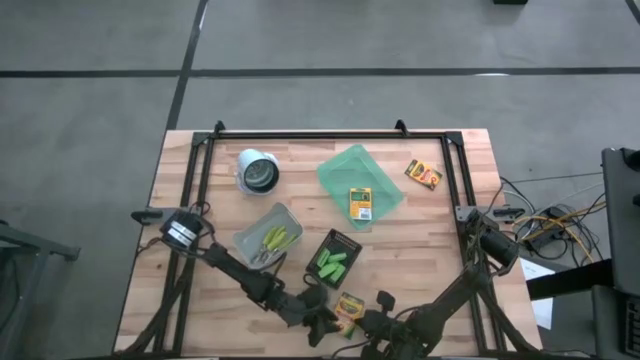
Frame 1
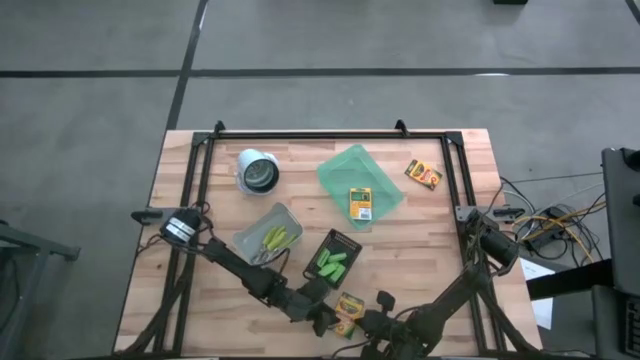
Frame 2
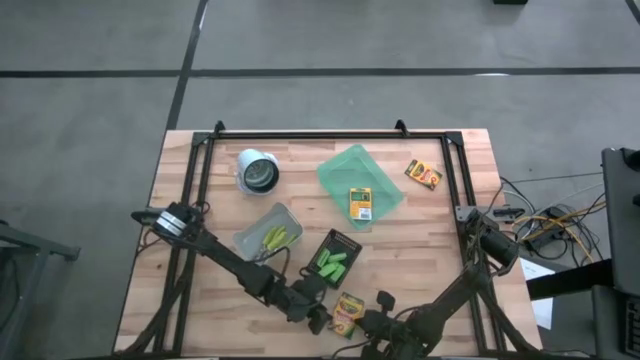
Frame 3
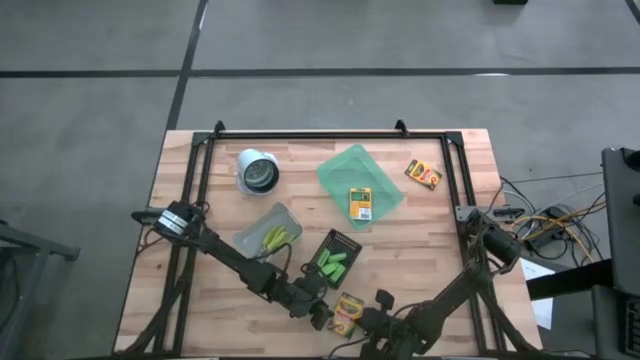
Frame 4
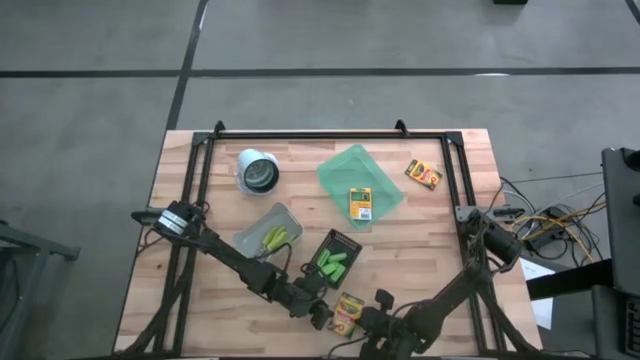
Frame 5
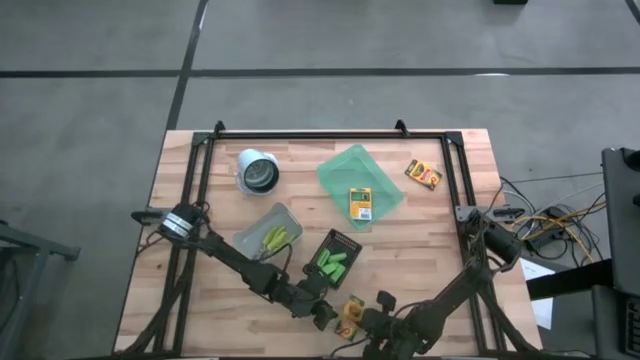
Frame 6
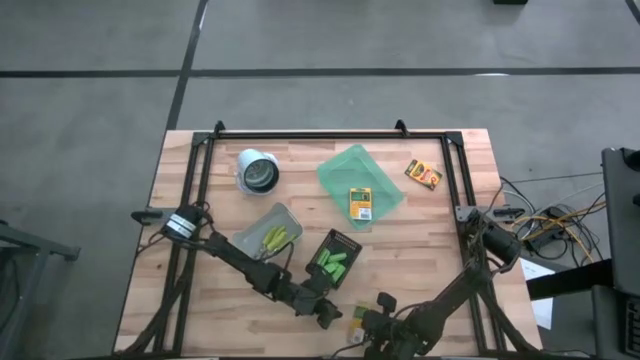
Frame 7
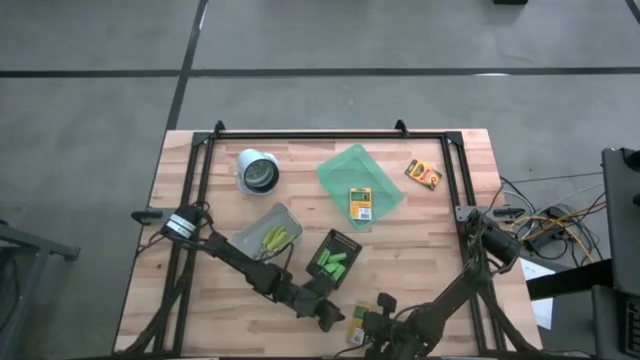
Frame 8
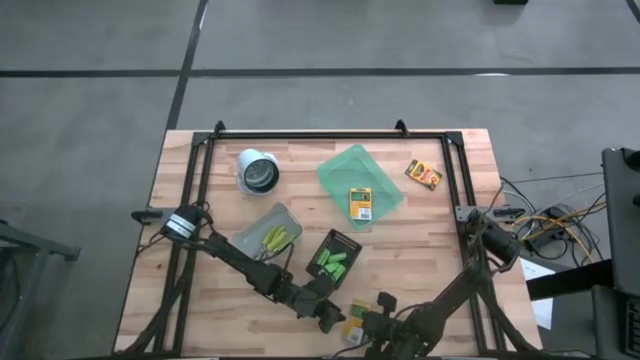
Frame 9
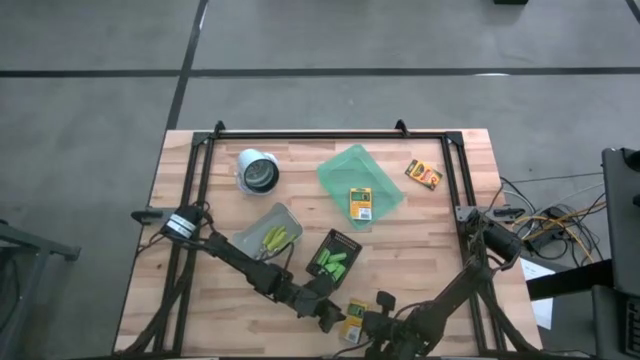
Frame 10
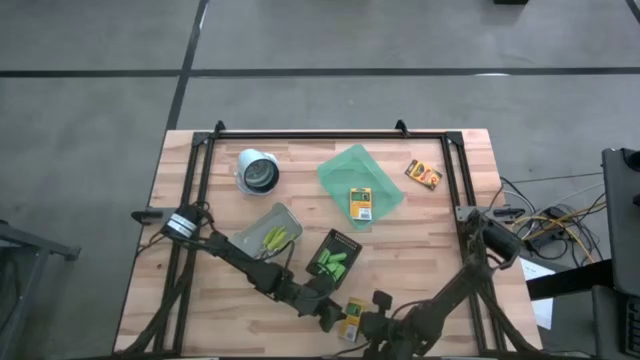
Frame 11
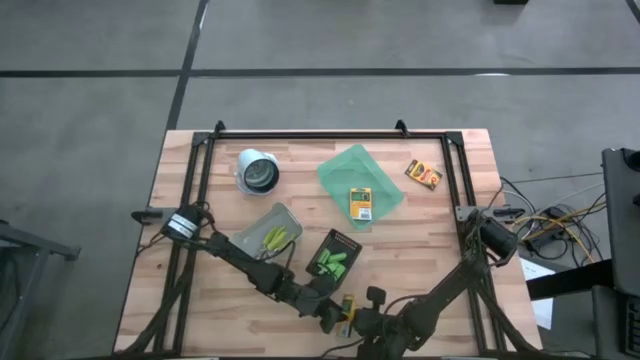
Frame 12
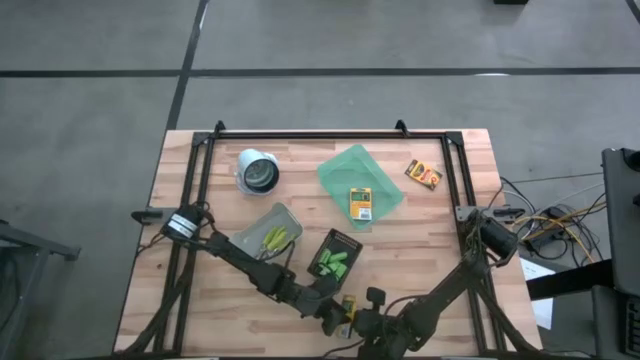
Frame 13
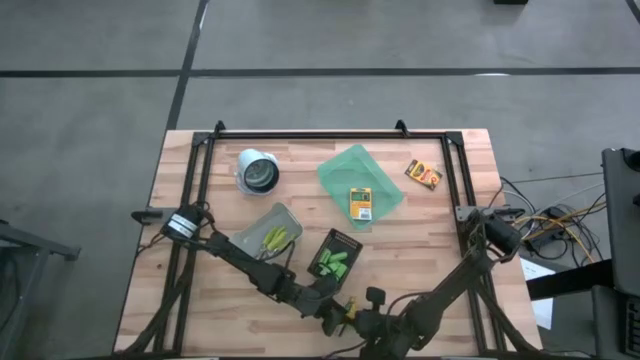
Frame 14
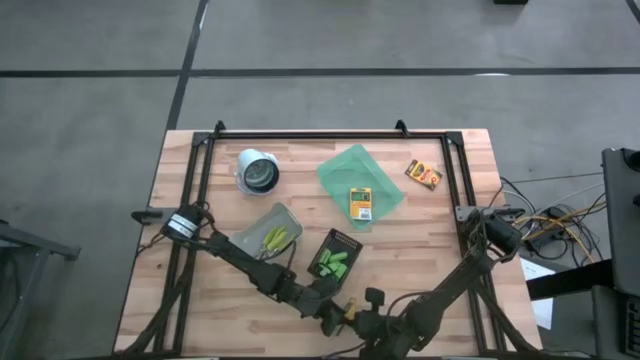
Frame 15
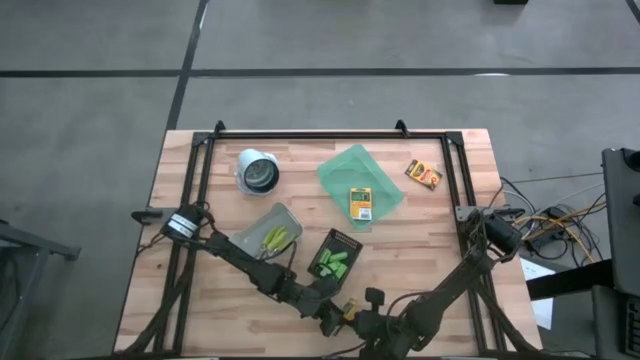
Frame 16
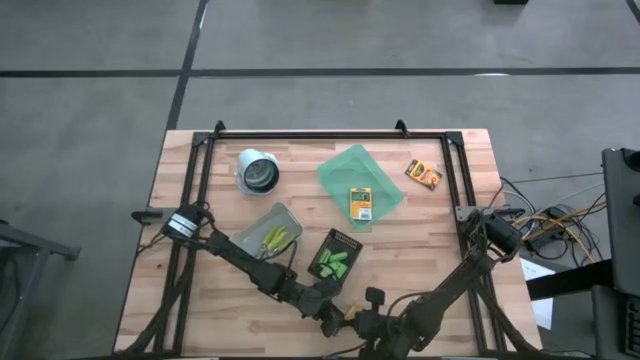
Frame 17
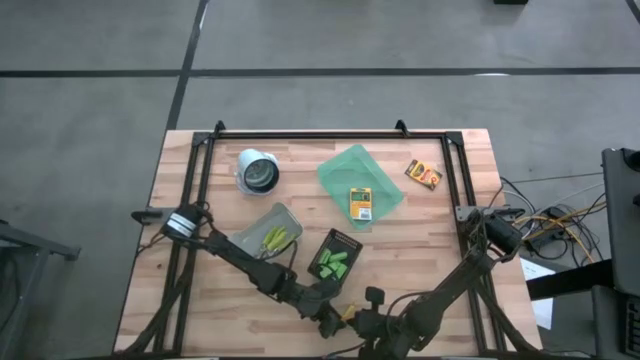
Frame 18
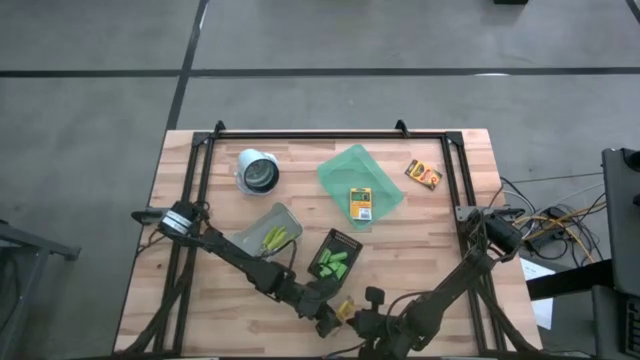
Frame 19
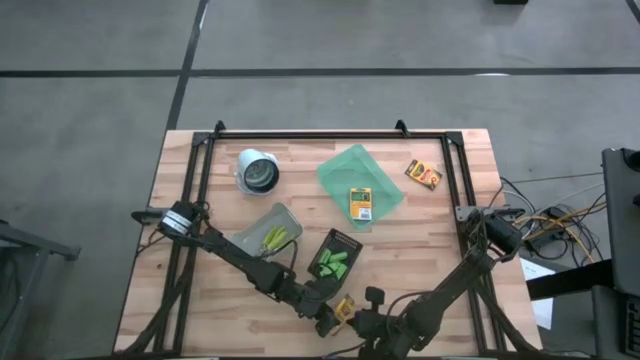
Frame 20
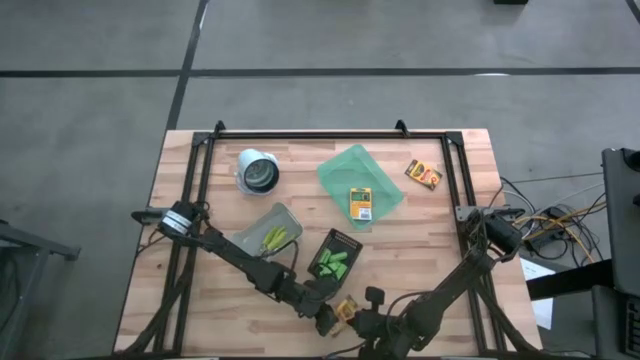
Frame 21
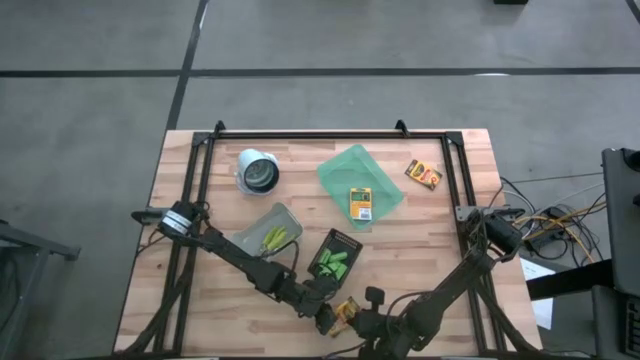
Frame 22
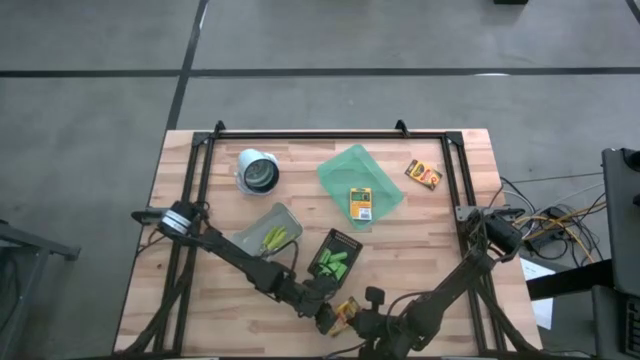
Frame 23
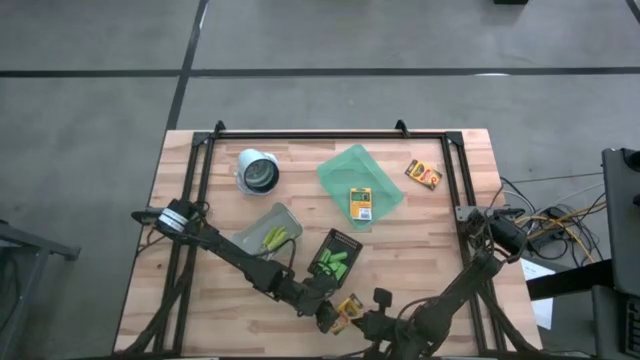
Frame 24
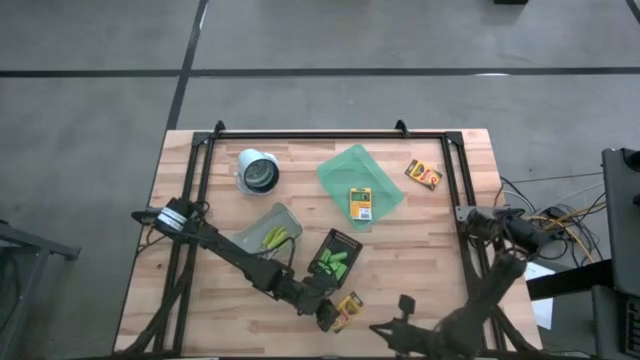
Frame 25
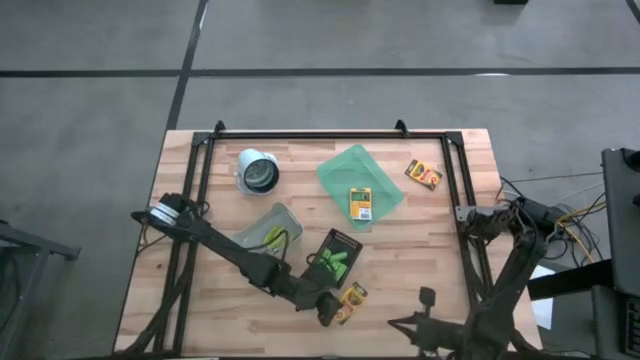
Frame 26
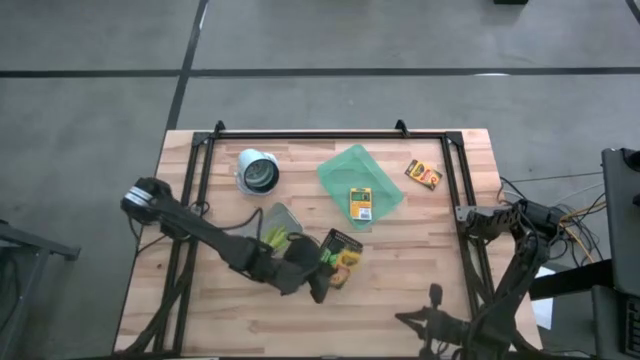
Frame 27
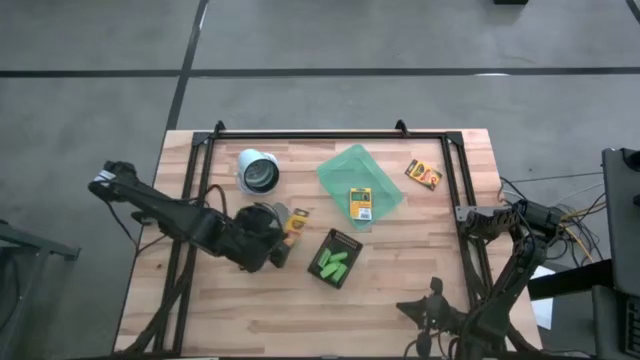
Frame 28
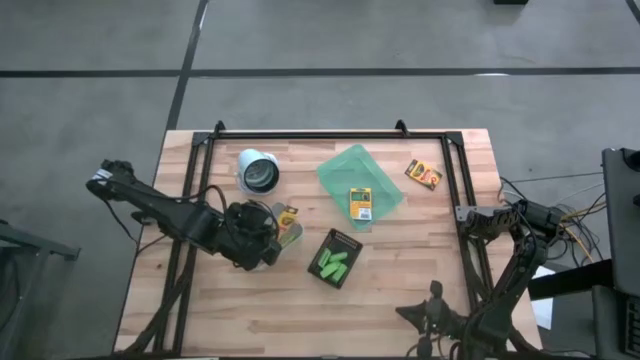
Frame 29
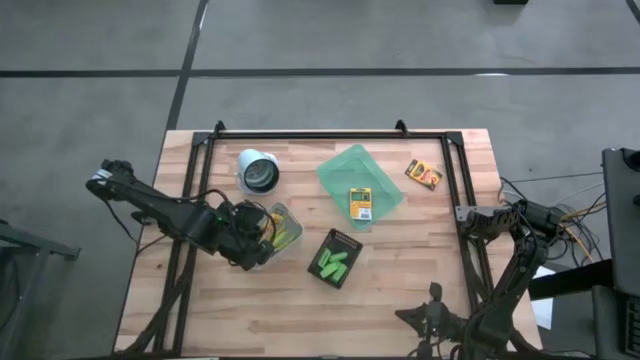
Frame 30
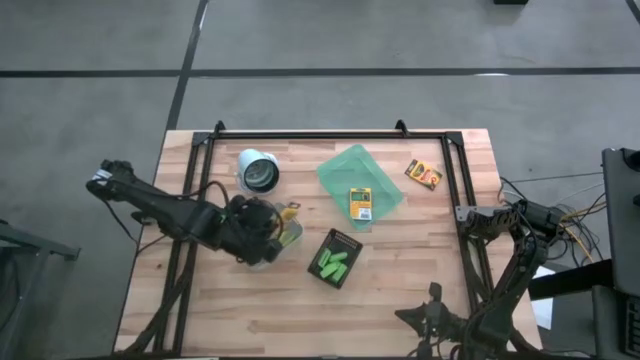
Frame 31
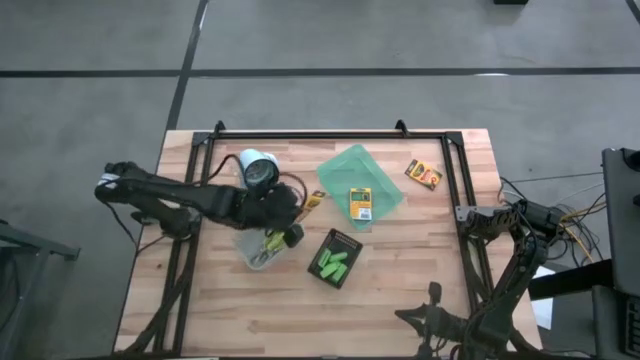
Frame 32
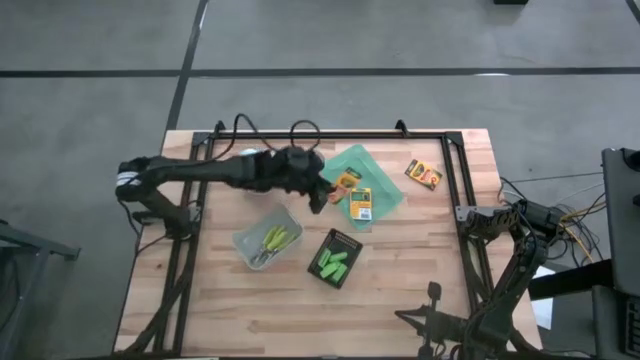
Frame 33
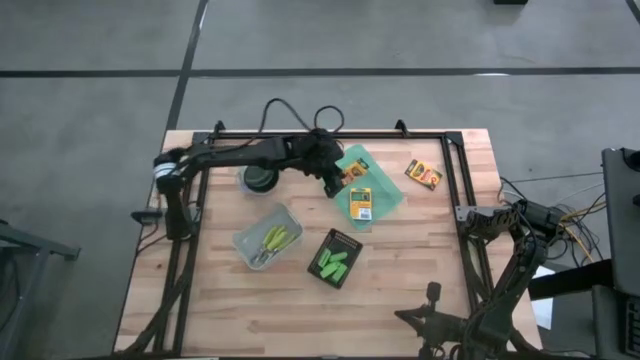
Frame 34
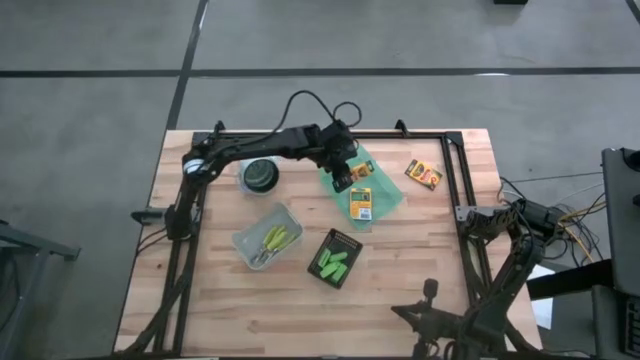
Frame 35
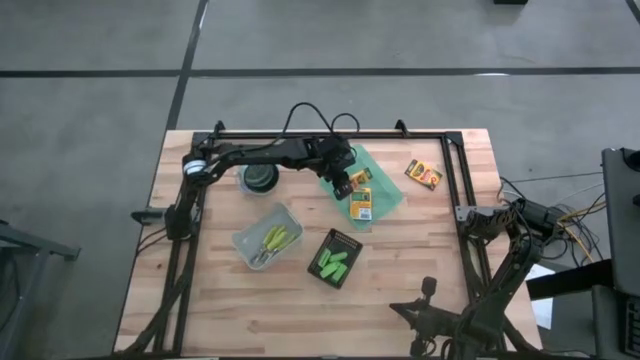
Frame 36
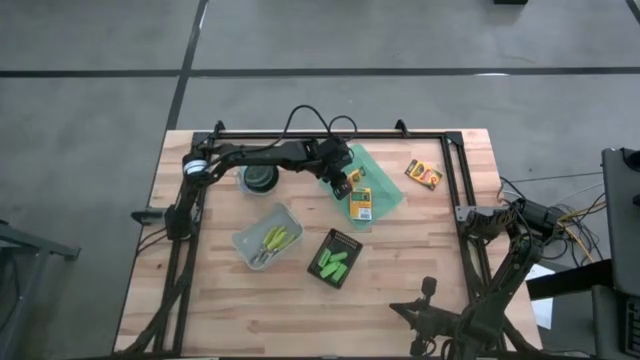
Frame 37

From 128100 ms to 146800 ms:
Task: Pick & Place School Supplies
Put the crayon box into the light green bin
